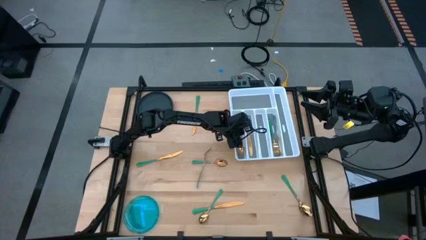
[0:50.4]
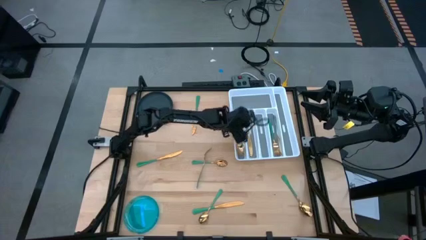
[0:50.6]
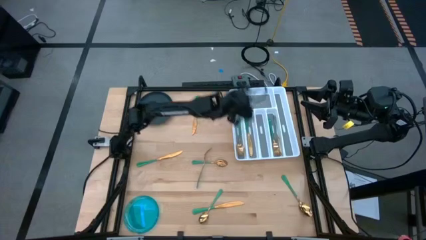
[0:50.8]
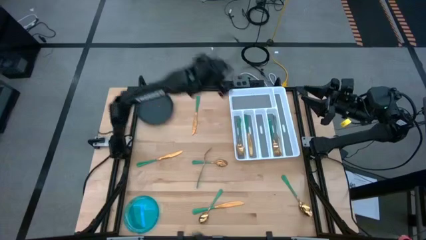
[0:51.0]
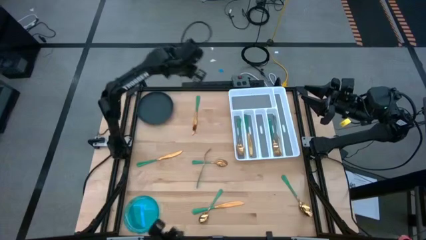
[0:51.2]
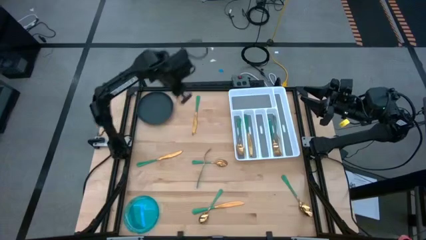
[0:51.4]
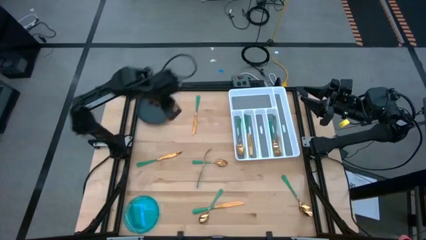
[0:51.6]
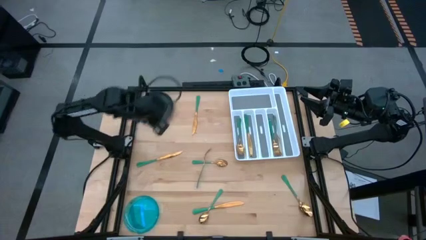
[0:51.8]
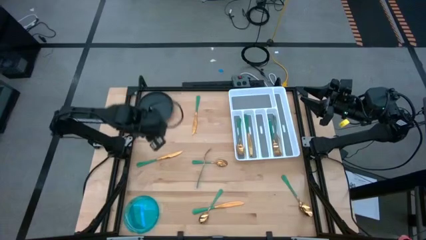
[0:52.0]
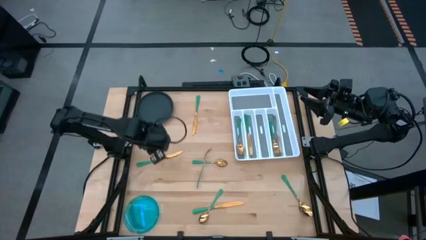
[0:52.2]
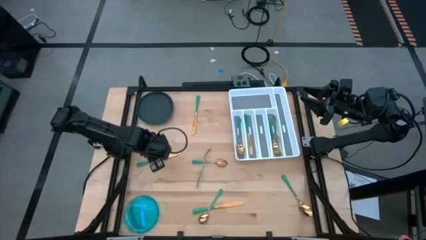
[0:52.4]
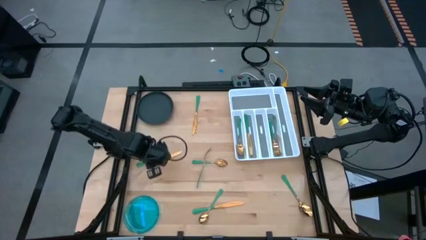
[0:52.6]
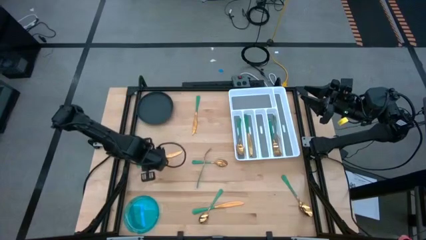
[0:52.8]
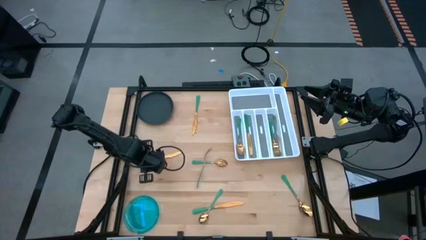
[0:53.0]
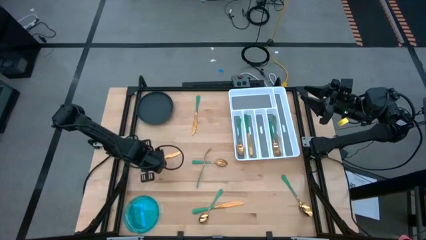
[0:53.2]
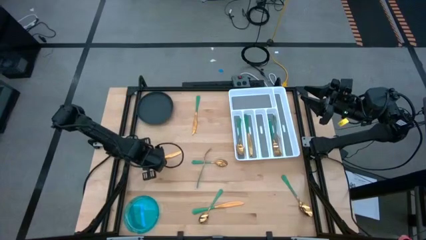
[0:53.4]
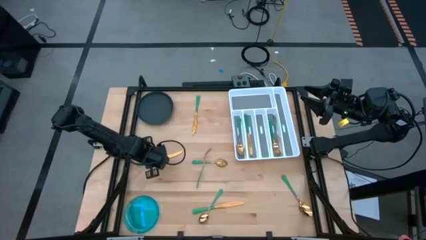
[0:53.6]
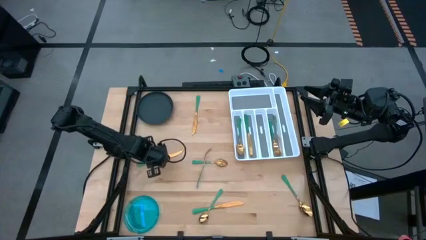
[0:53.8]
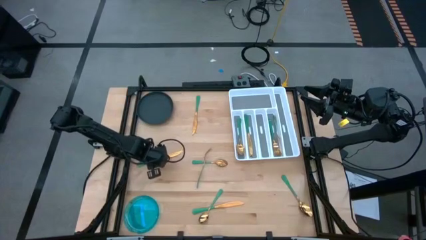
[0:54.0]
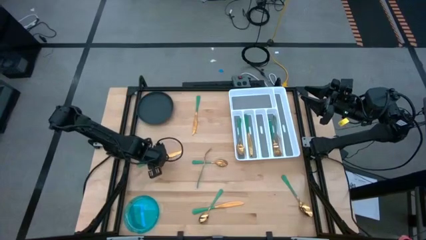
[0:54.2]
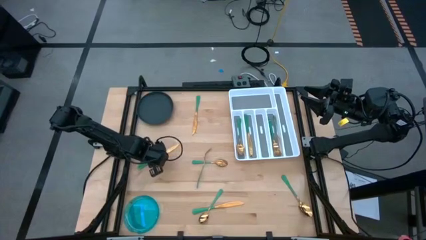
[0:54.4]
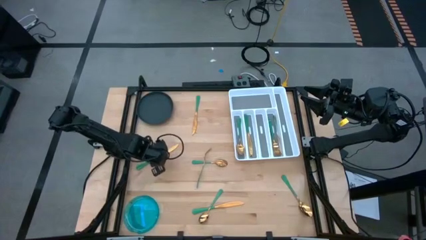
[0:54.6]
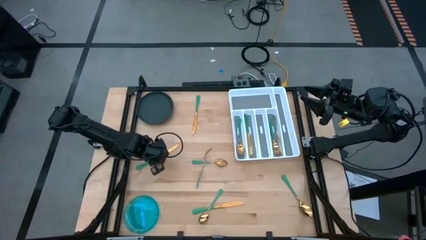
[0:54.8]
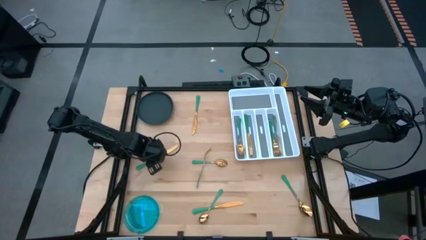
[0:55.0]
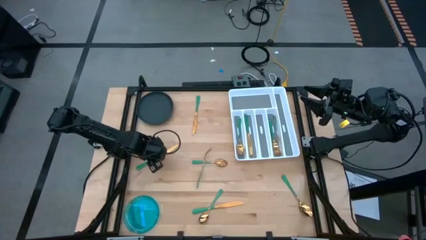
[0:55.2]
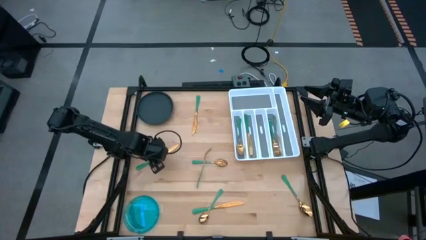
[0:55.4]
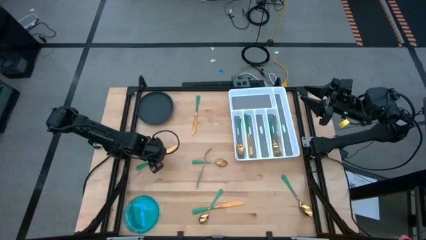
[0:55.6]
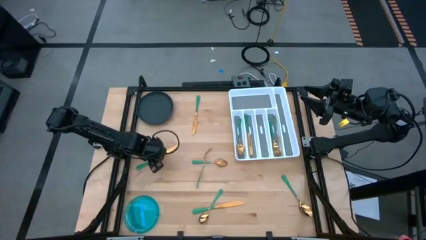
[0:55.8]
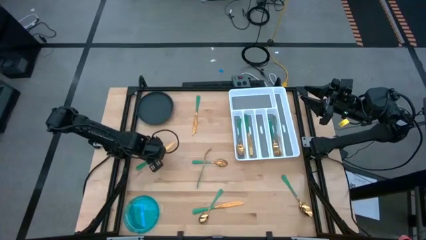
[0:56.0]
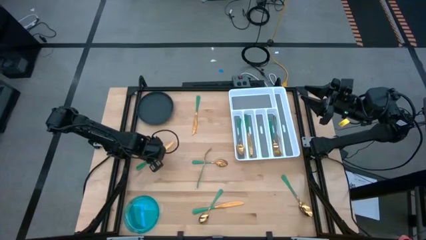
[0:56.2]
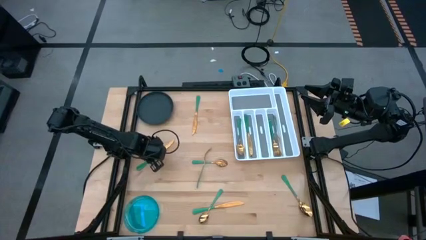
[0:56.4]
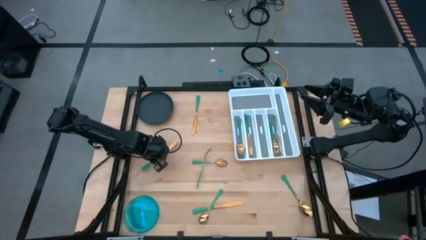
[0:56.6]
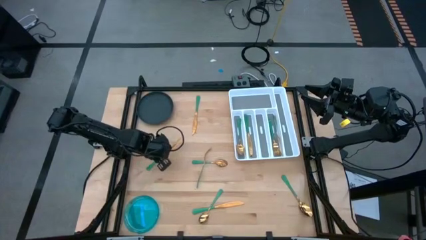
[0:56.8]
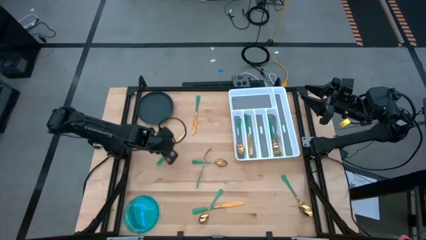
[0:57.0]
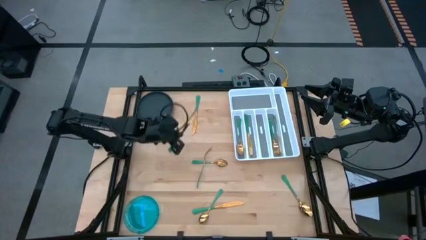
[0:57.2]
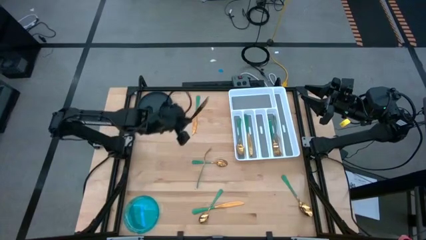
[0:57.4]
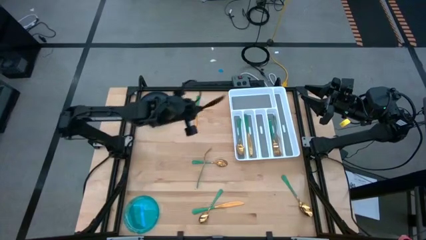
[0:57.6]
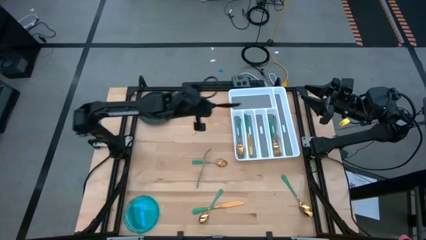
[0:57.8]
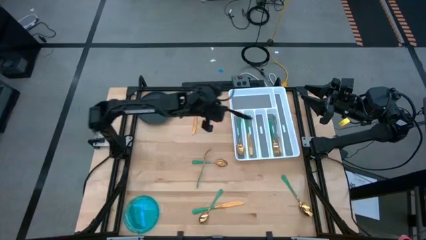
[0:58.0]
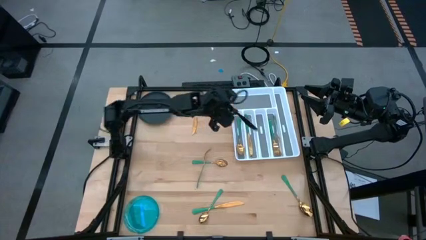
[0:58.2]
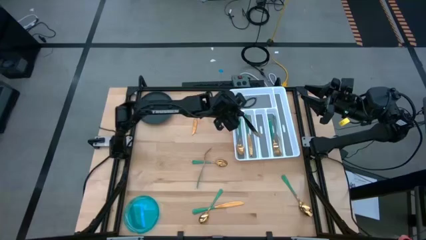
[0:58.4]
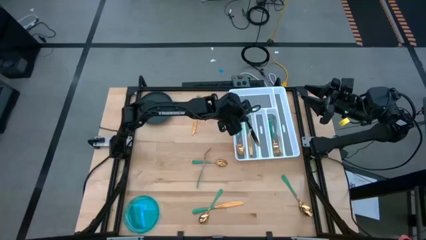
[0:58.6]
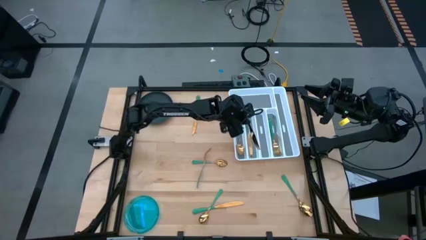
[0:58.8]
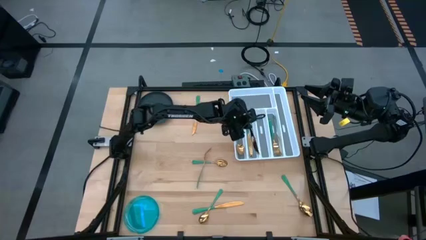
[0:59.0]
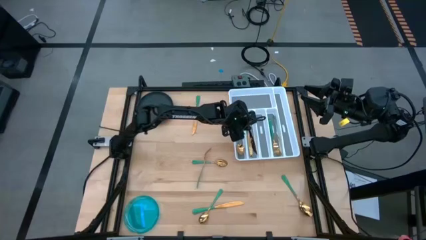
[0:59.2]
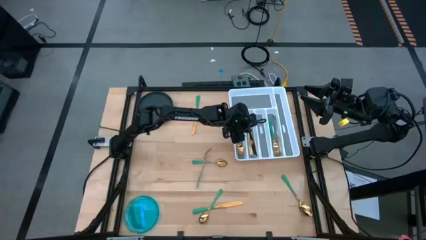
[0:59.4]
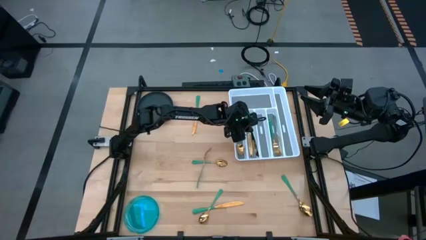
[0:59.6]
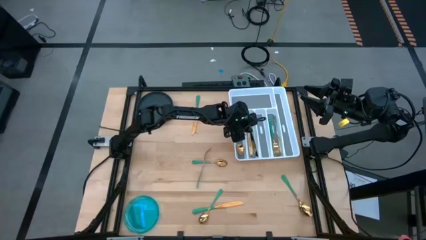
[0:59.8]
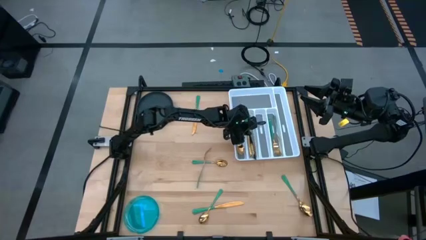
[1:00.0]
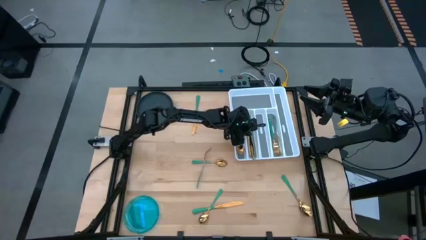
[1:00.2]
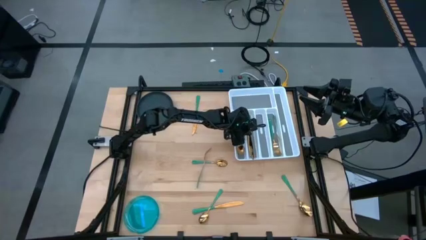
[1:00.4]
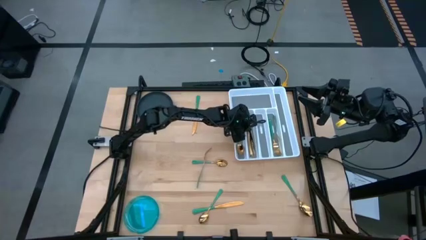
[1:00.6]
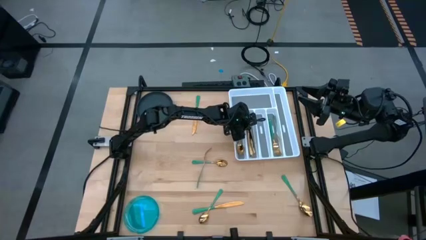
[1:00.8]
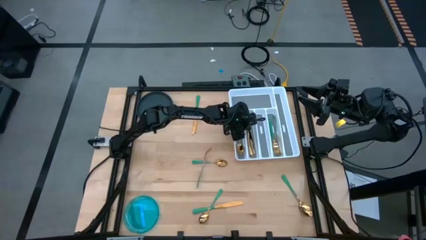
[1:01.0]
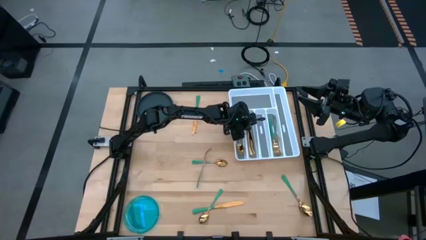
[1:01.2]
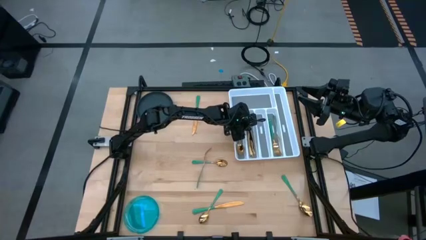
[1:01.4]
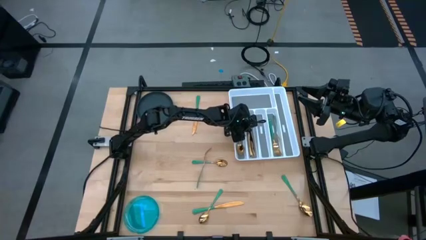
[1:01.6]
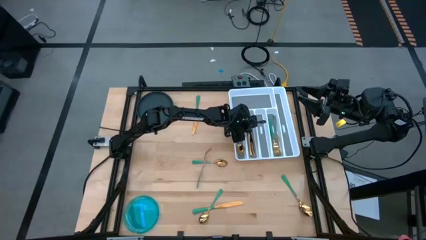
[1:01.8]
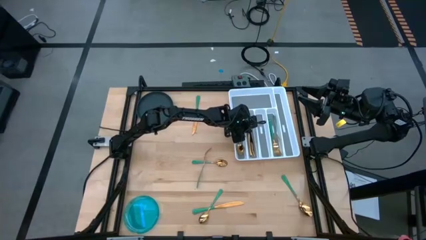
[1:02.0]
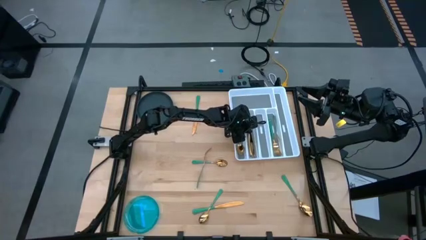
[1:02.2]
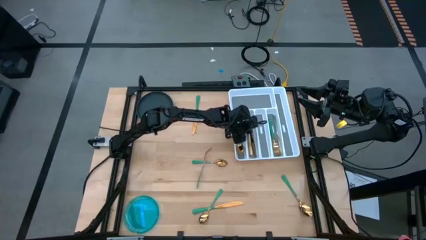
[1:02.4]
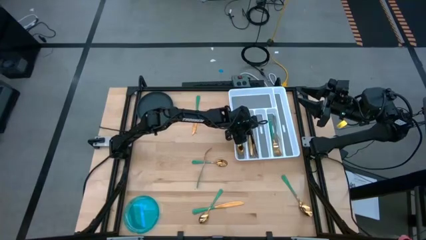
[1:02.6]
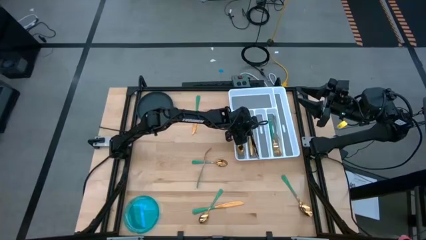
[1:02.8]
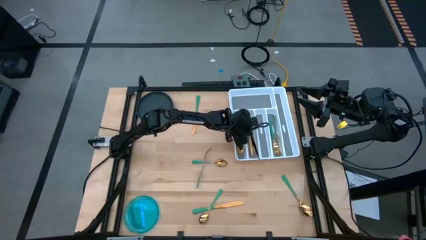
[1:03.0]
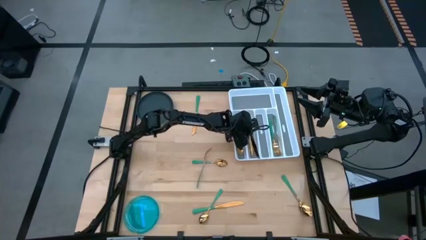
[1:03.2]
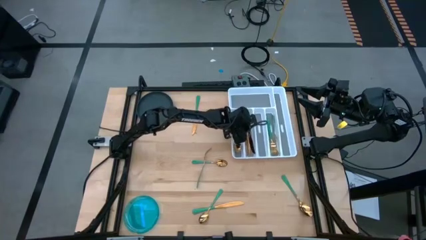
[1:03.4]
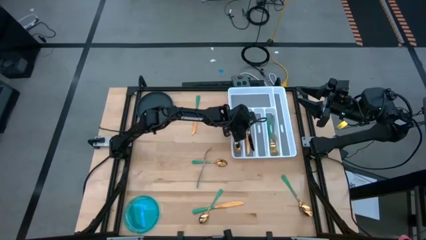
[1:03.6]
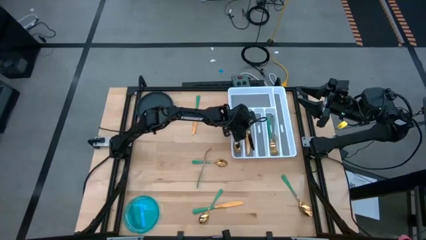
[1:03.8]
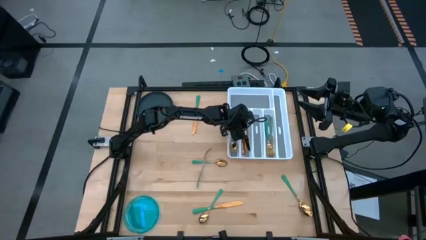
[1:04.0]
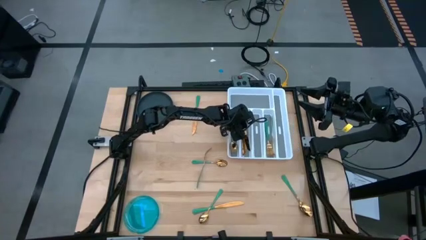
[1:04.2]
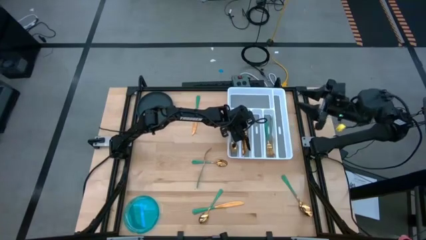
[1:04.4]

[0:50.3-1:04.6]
Task: Sort silverware
Put the left green knife on the silverware tray with the other green knife

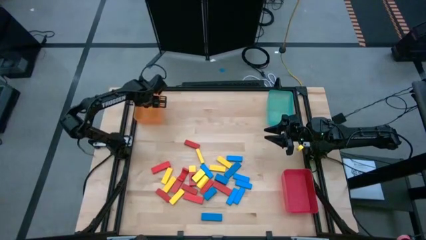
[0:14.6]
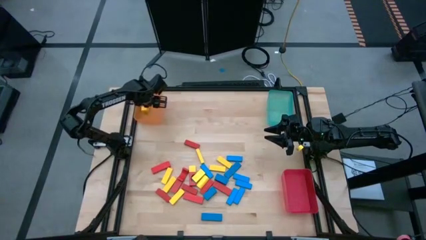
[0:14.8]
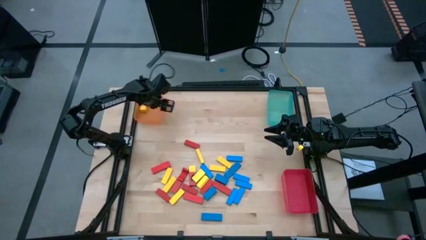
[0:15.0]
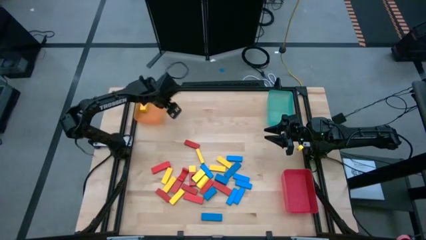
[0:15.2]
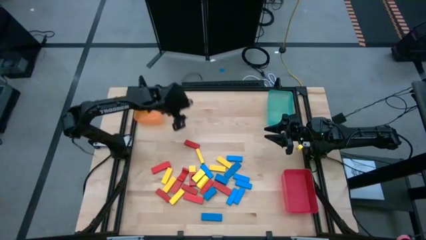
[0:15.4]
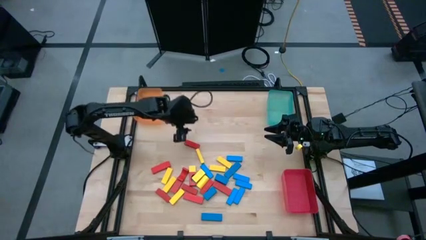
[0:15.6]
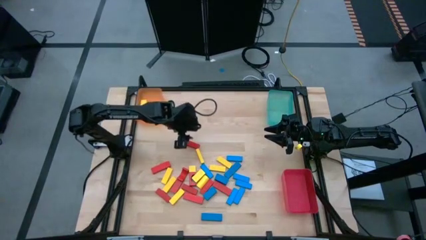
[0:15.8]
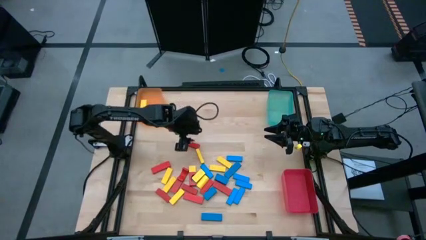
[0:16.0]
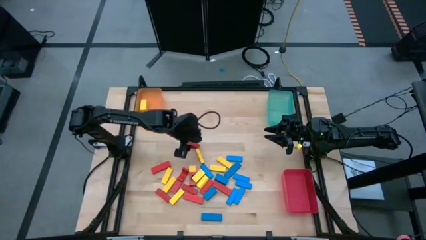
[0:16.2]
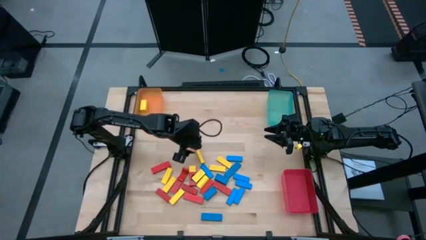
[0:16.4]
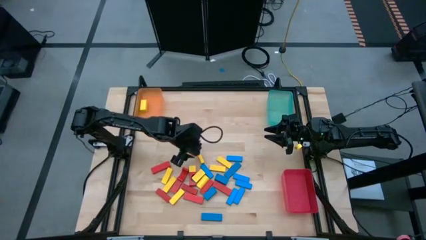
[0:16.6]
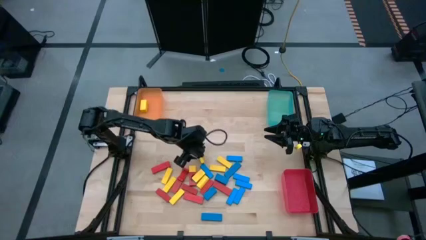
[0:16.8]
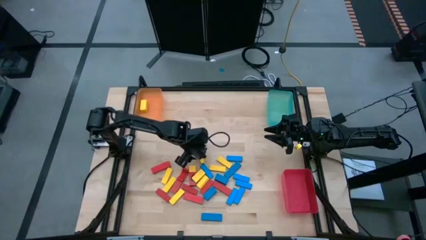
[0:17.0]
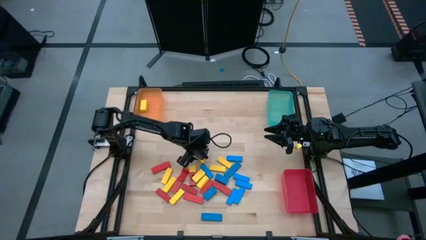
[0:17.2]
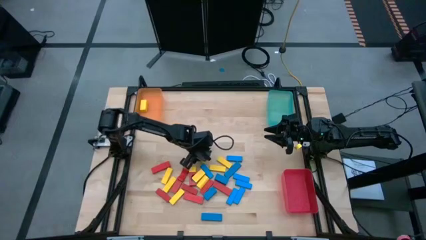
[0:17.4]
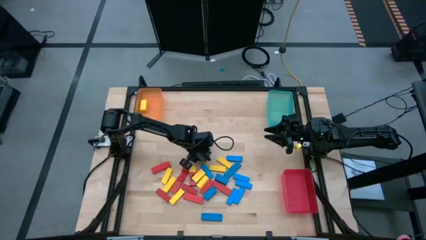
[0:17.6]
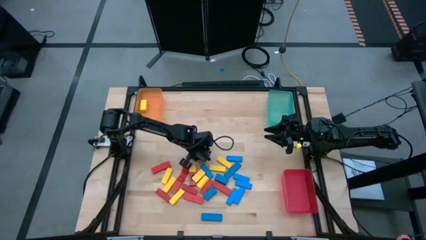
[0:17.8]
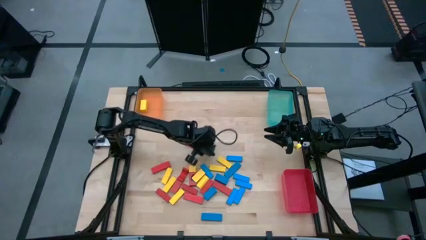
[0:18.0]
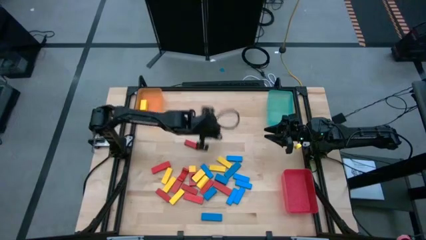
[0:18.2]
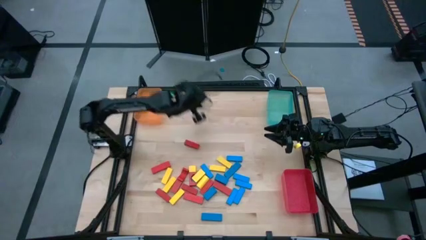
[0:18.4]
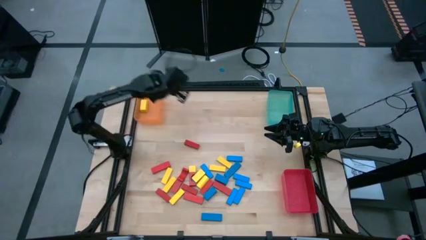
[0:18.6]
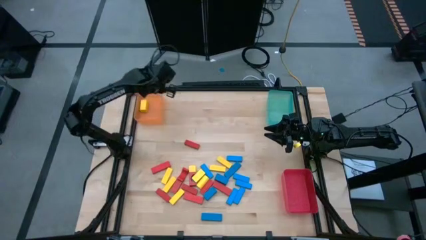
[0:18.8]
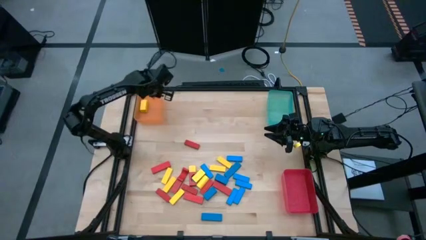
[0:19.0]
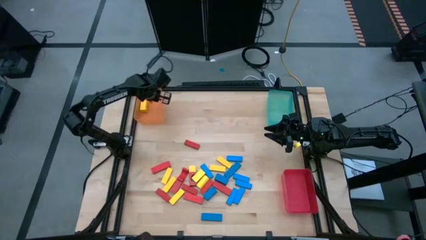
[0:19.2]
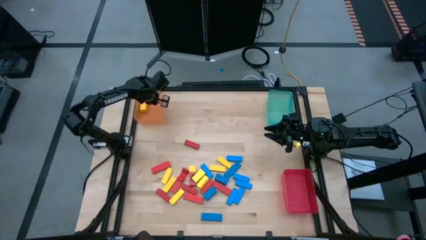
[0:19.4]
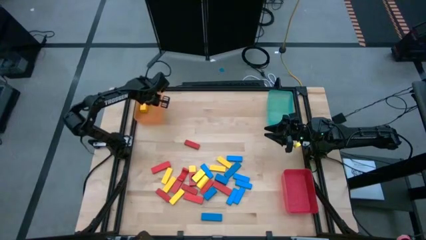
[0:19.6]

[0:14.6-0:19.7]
Task: Sort blocks
Put the yellow block into the orange bin
